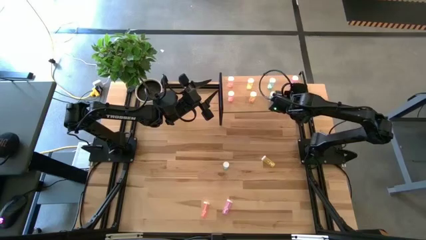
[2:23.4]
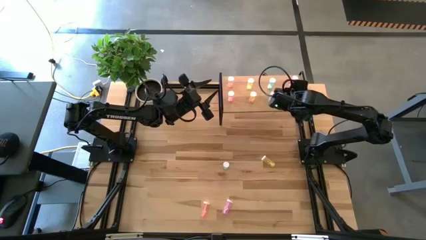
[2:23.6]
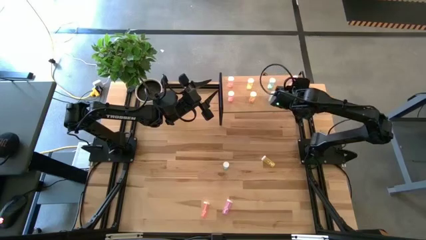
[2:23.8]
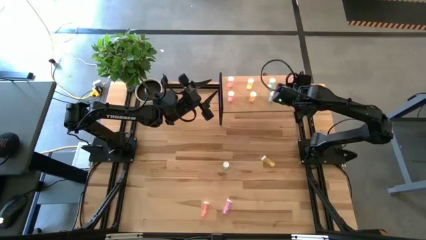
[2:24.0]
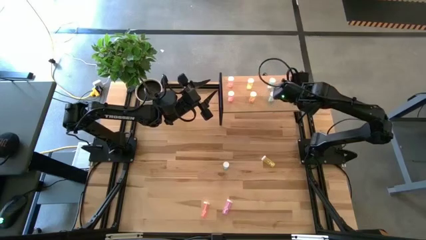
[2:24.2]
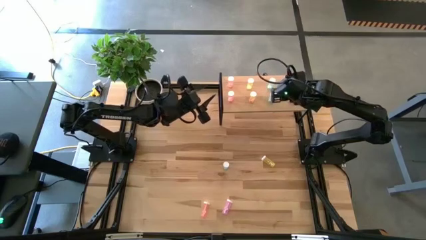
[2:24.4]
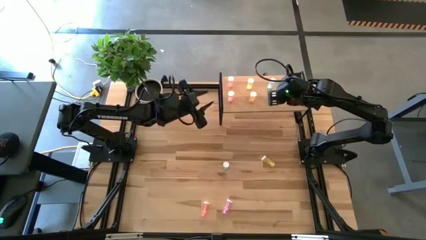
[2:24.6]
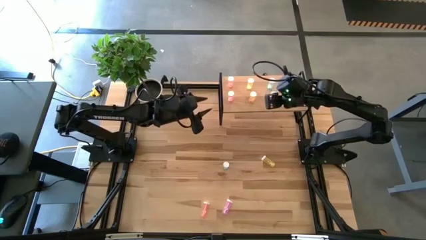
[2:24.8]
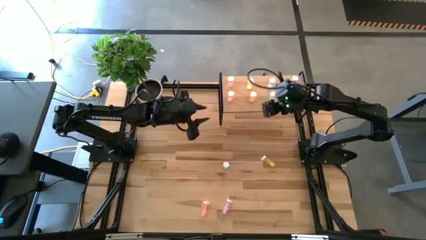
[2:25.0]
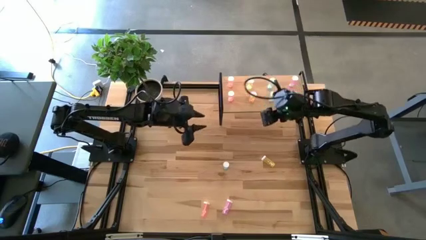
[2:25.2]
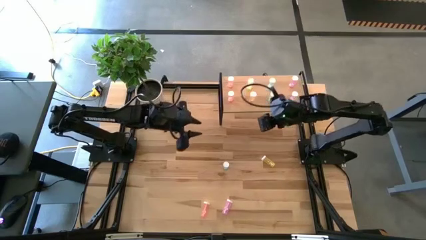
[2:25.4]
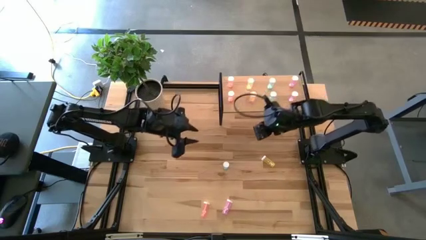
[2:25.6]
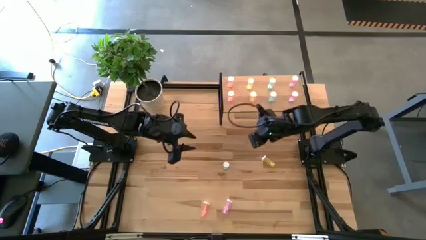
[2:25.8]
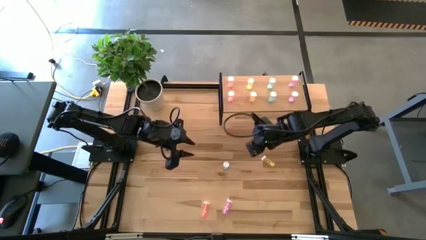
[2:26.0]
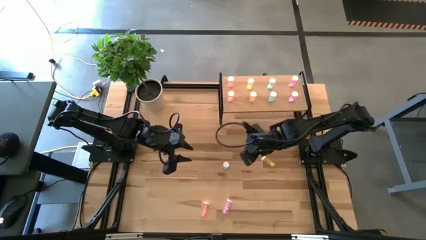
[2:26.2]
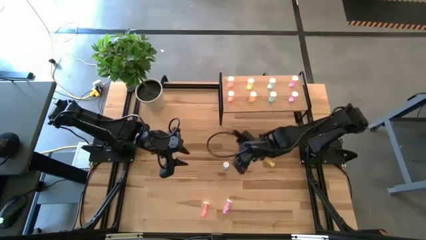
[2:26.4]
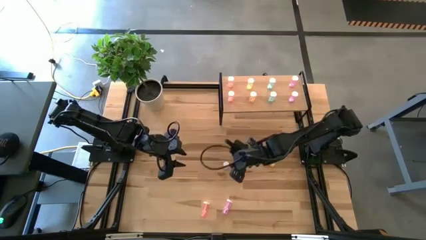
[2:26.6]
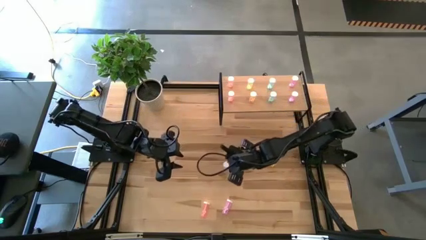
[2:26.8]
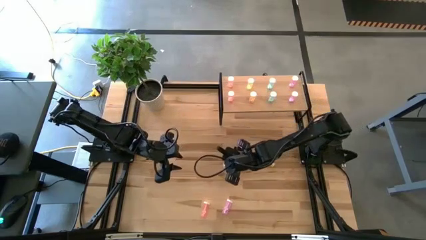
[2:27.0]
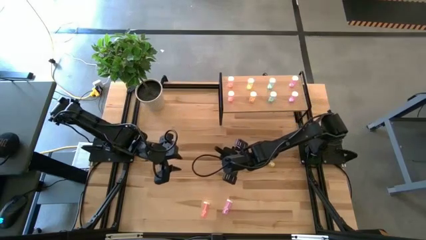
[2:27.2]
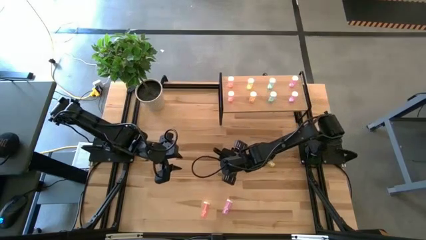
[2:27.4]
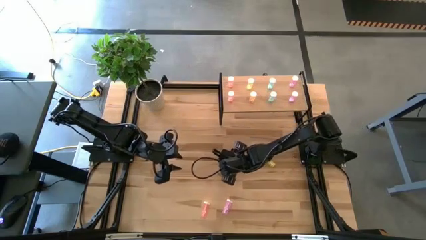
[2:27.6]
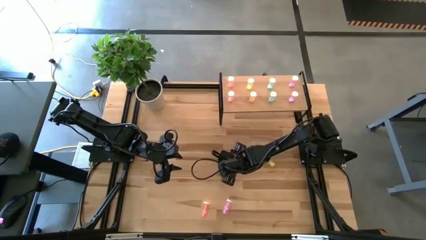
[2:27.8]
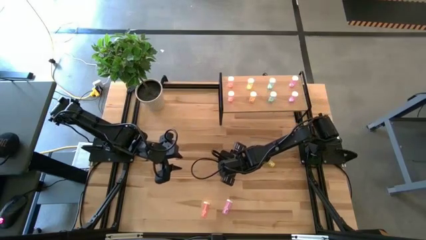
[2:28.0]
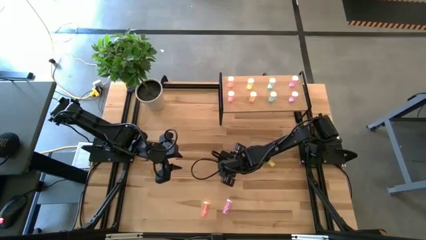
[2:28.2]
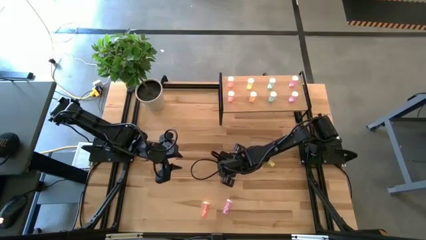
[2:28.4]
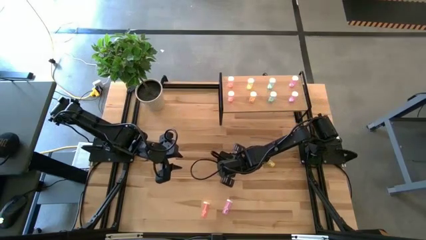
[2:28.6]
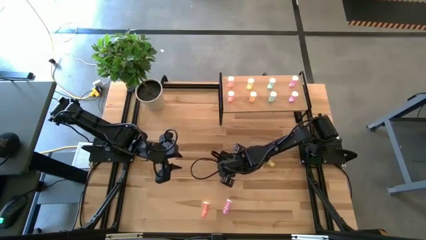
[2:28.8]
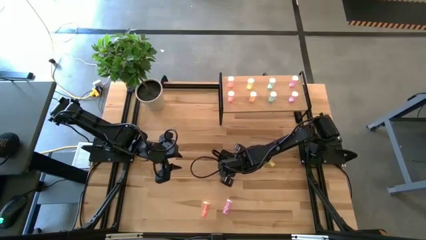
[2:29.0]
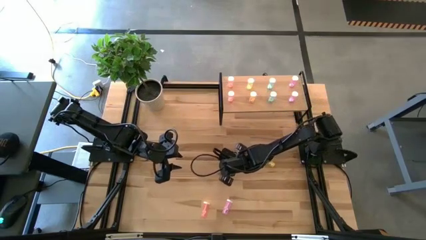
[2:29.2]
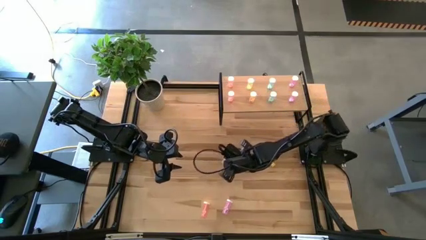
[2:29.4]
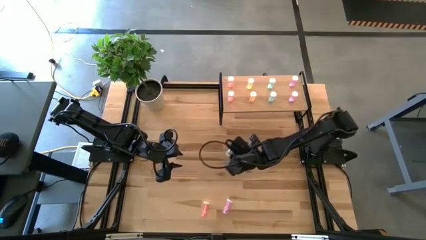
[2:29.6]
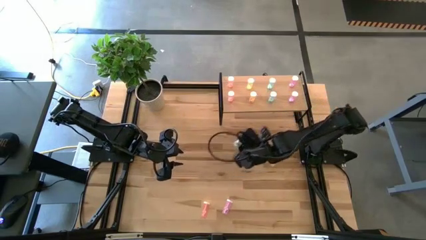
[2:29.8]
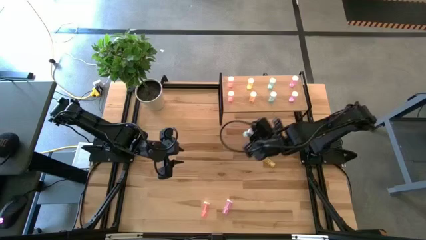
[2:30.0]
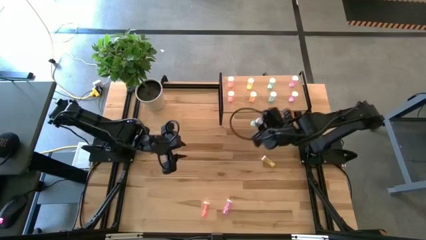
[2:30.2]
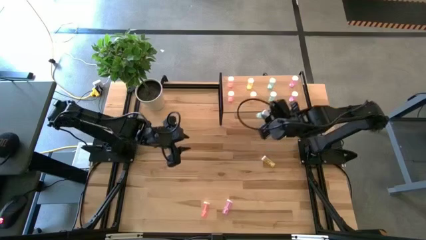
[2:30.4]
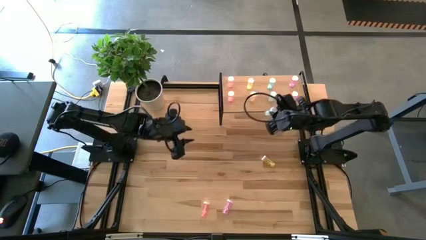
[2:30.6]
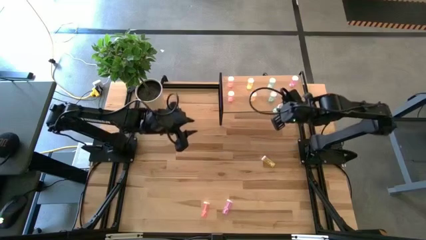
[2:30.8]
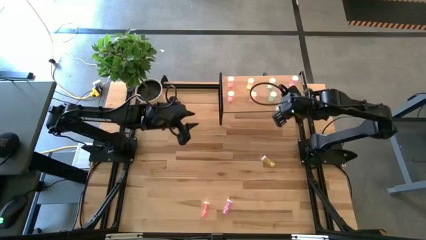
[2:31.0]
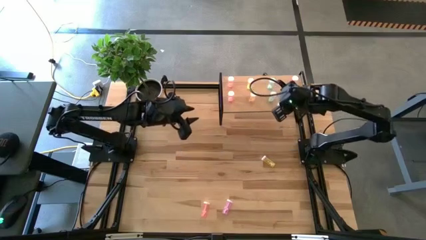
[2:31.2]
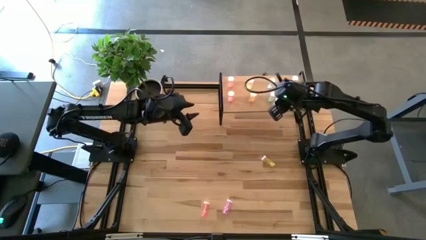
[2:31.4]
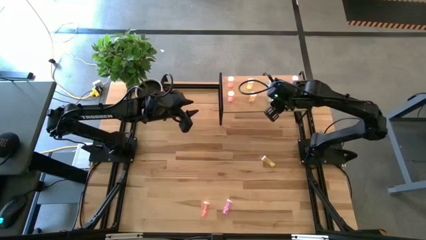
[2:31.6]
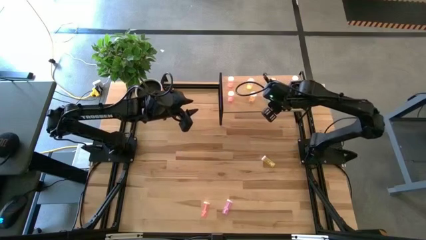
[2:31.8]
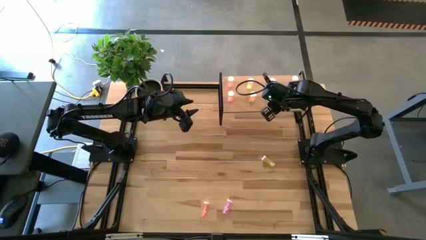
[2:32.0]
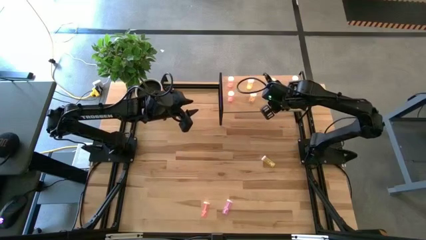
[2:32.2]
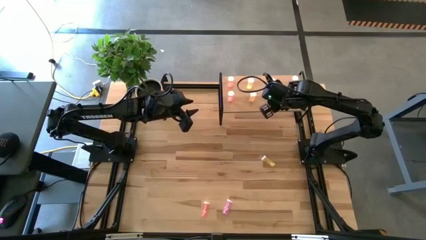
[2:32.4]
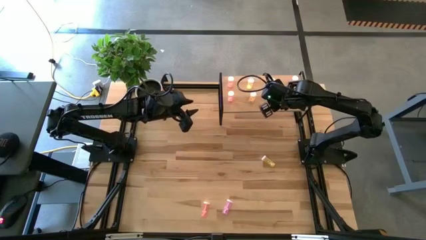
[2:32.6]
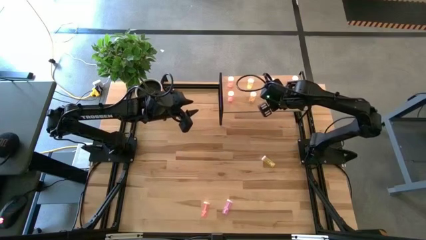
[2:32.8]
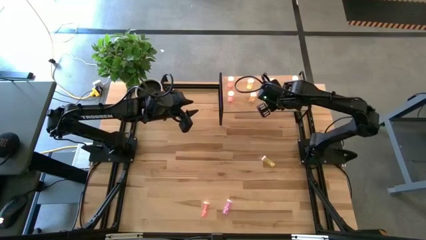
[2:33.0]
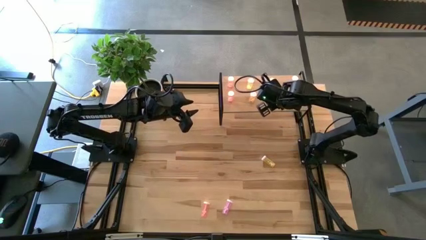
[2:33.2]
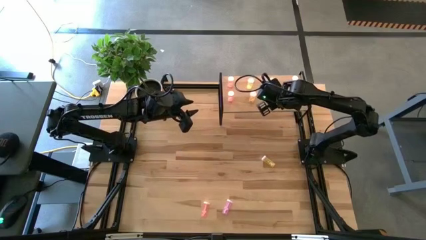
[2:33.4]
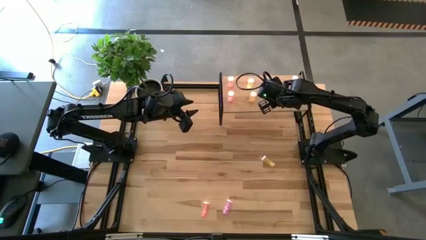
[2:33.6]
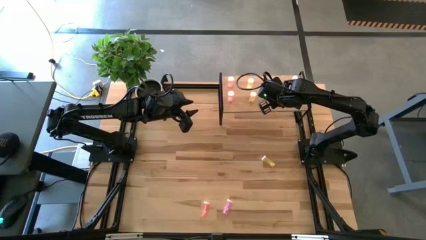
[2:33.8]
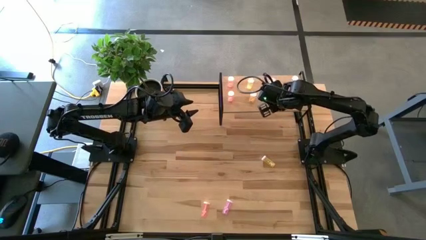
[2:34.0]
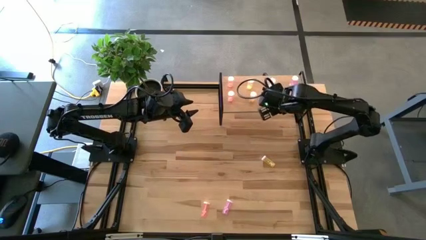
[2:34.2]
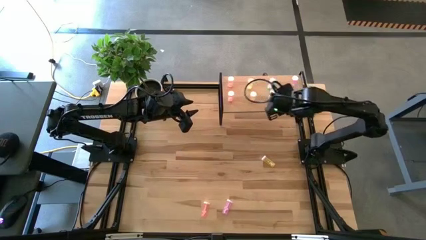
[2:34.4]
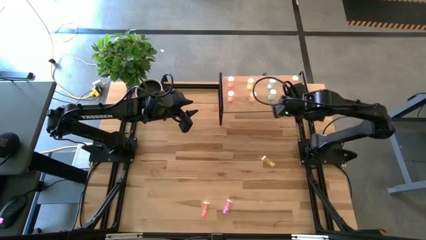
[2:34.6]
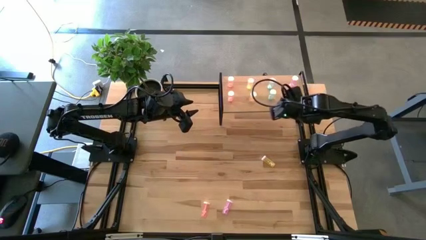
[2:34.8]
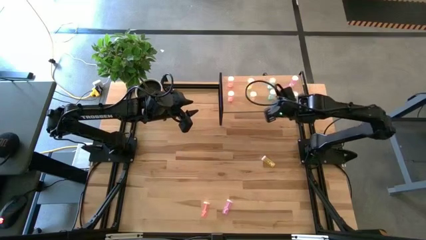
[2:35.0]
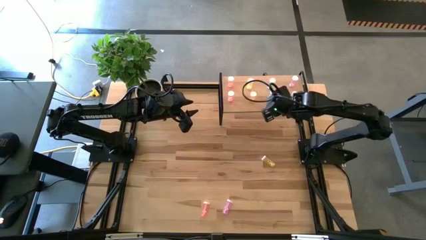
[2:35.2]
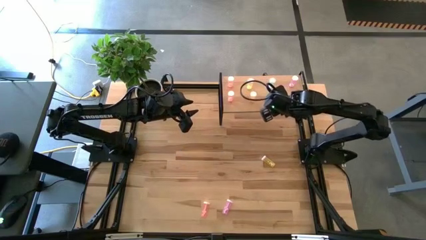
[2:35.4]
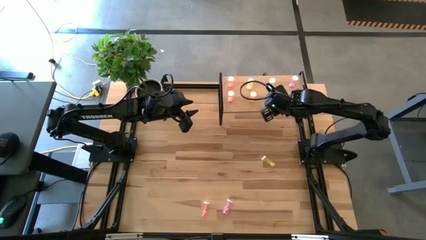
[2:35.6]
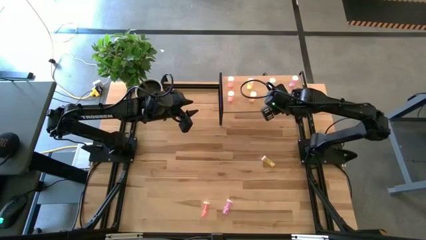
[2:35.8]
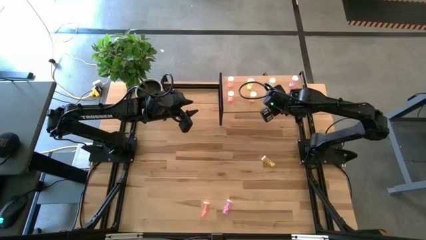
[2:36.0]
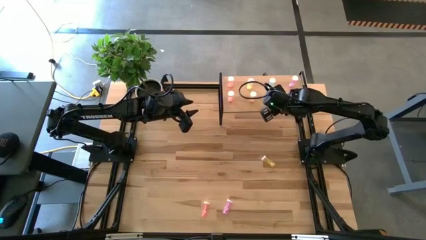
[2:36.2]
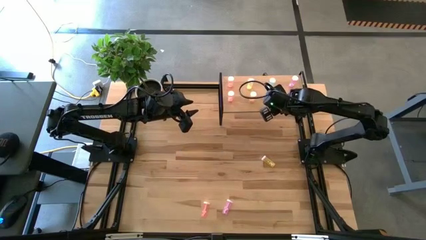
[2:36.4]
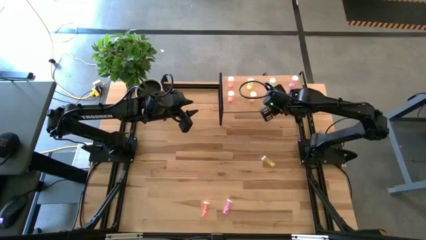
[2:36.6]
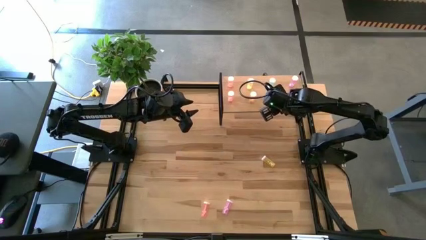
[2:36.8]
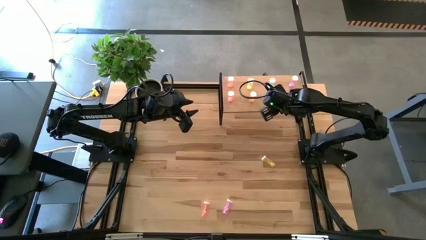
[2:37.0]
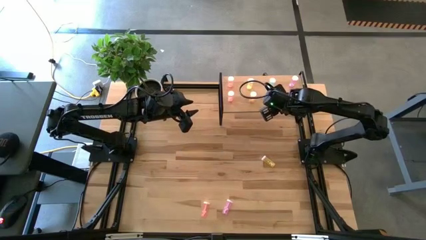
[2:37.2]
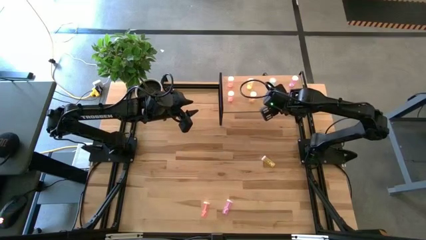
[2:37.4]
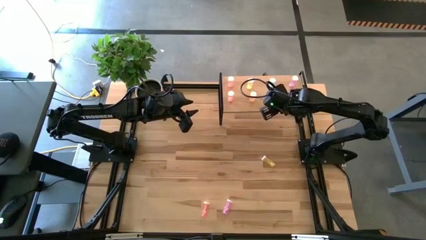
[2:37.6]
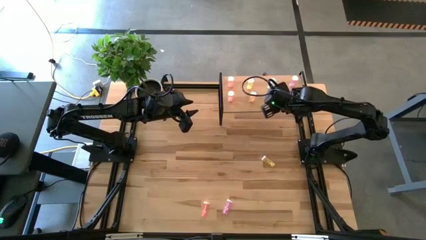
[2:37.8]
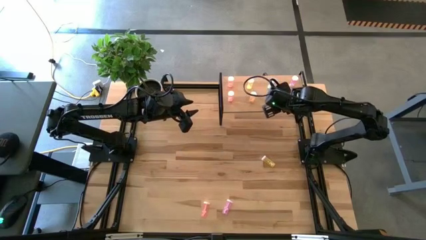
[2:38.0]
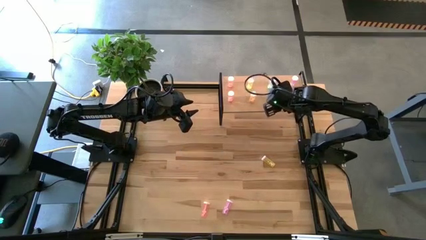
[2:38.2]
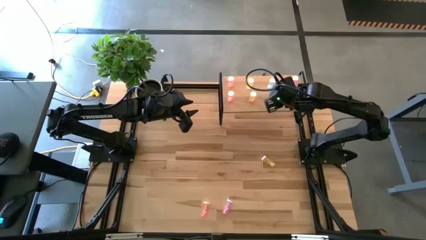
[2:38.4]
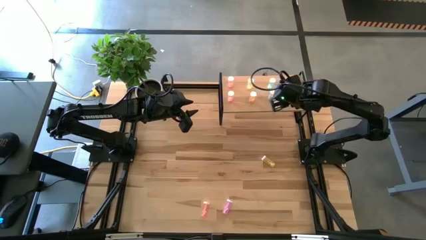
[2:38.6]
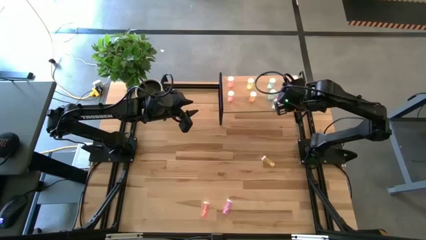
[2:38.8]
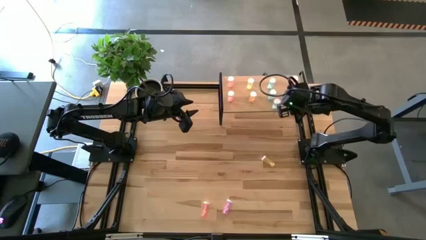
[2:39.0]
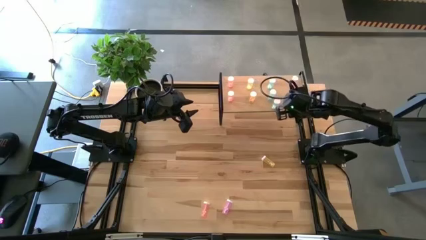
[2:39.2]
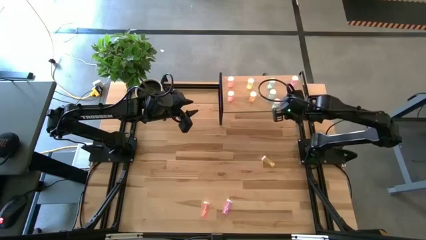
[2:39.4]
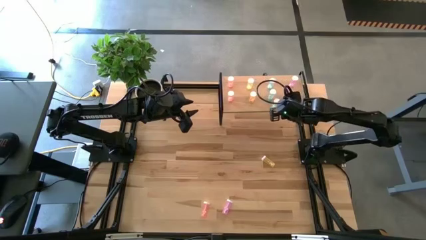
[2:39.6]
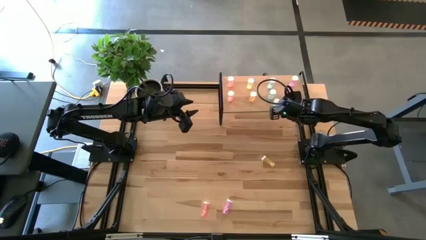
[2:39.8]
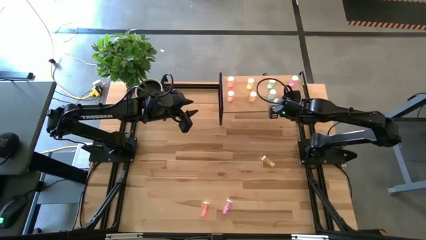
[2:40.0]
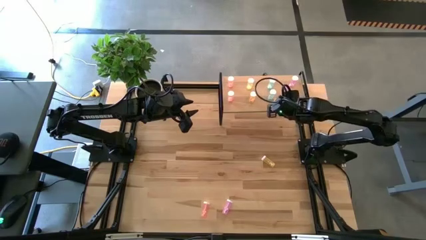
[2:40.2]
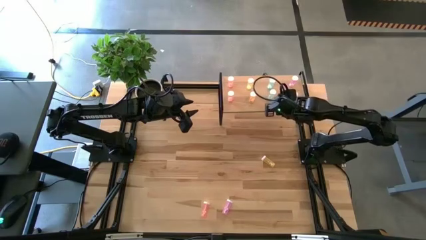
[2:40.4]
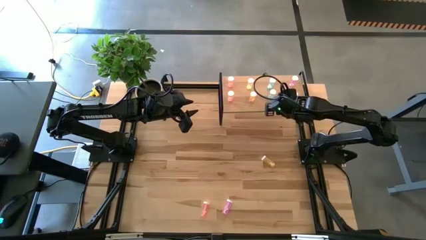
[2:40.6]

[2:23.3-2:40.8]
Task: Pick and place medicine bottles onto shelf by color
Put the blue pill bottle on the shelf aligned with the other blue pill bottles
